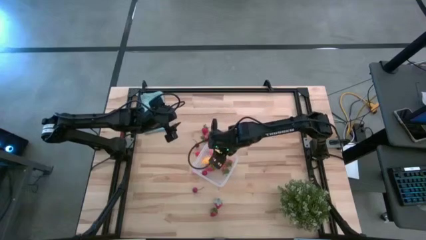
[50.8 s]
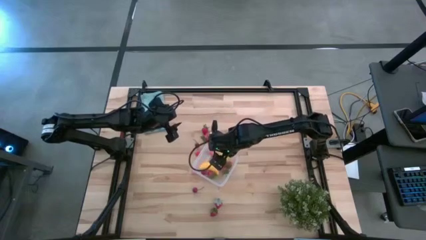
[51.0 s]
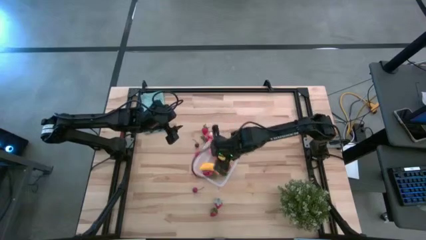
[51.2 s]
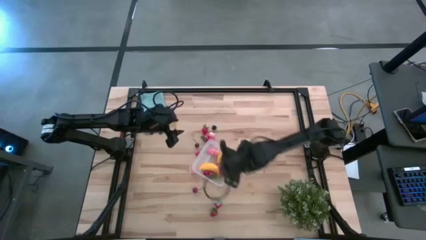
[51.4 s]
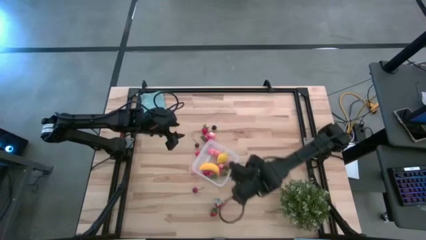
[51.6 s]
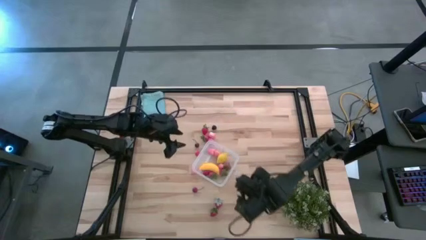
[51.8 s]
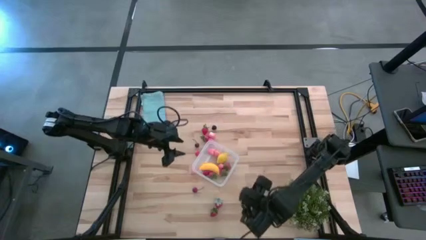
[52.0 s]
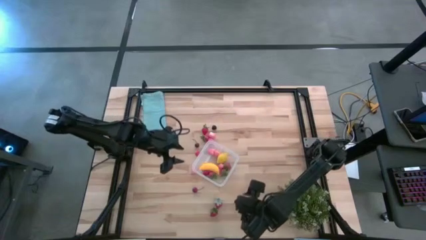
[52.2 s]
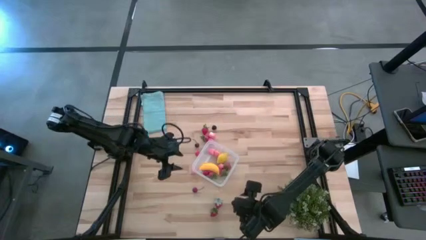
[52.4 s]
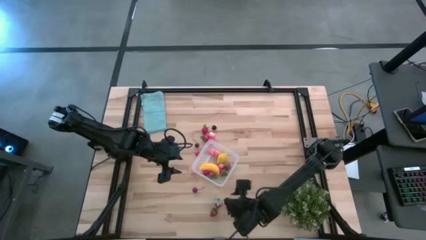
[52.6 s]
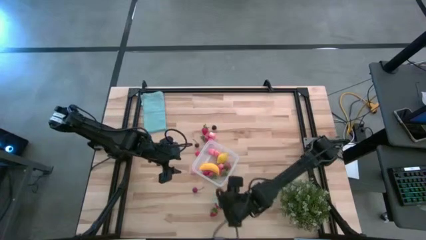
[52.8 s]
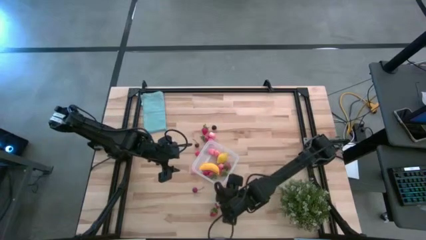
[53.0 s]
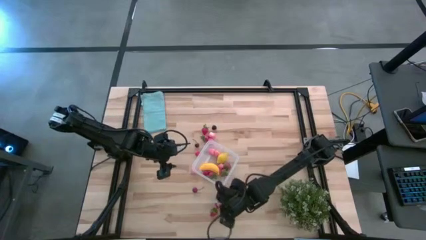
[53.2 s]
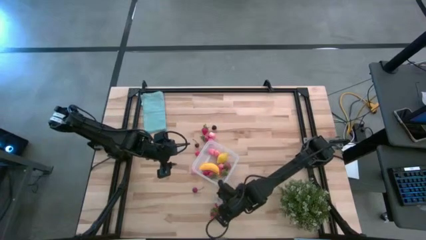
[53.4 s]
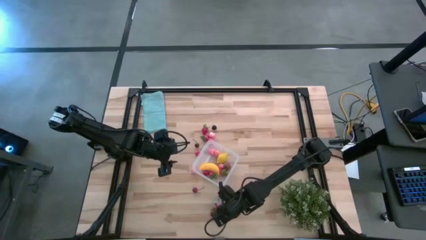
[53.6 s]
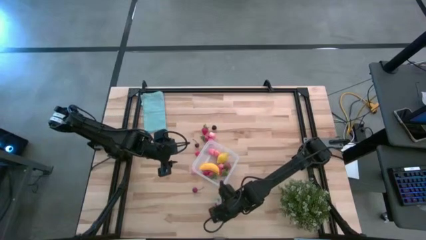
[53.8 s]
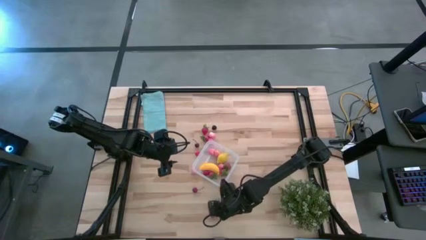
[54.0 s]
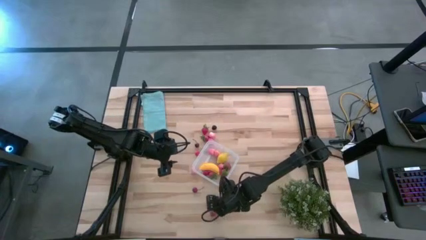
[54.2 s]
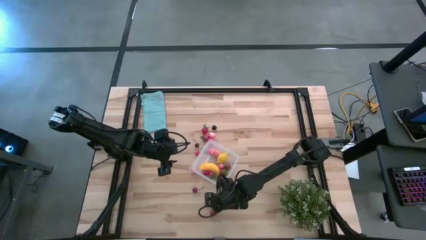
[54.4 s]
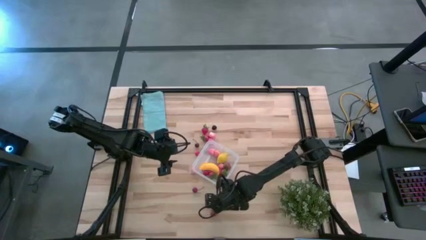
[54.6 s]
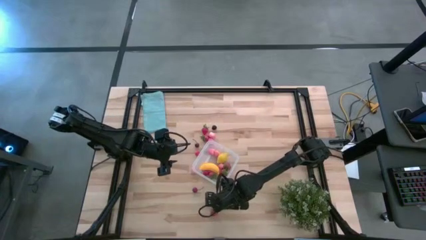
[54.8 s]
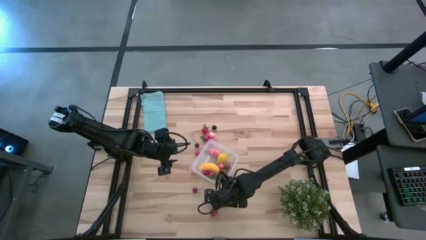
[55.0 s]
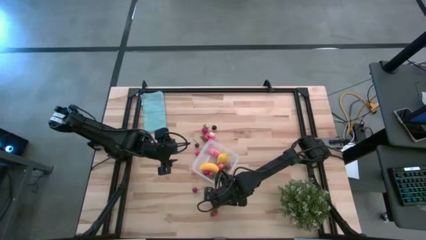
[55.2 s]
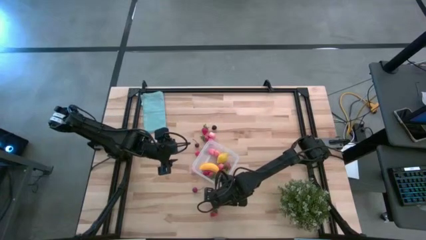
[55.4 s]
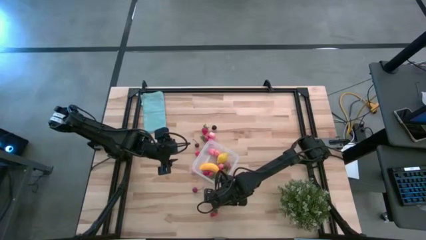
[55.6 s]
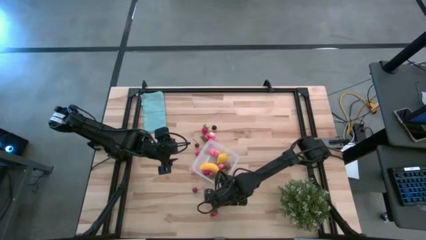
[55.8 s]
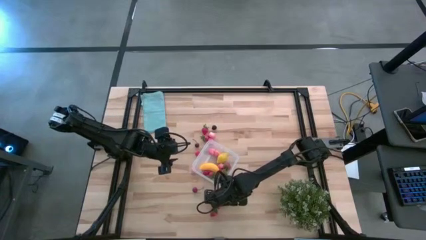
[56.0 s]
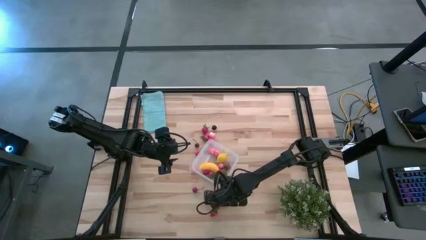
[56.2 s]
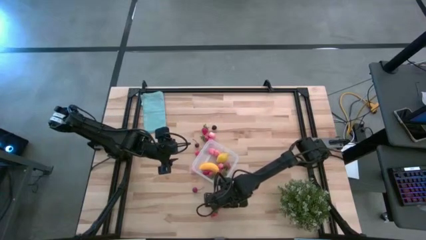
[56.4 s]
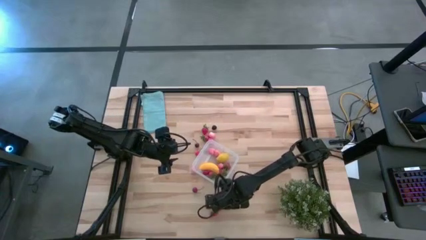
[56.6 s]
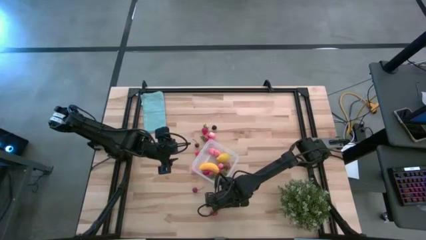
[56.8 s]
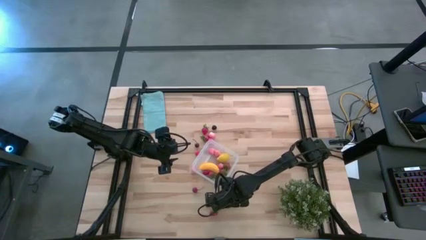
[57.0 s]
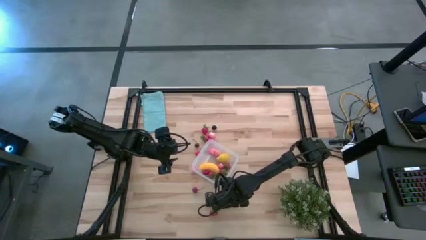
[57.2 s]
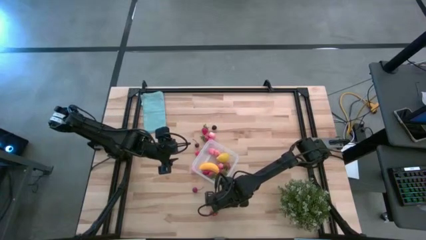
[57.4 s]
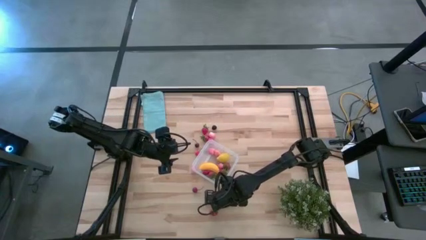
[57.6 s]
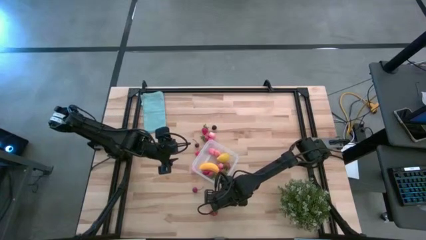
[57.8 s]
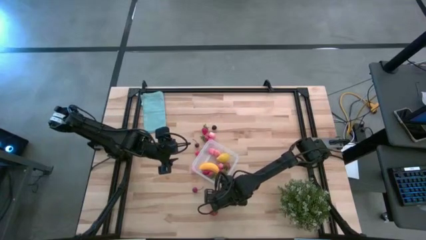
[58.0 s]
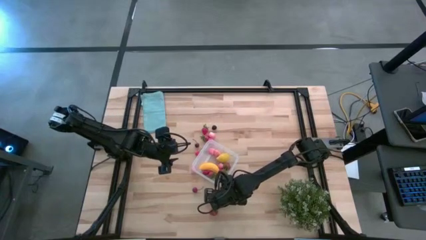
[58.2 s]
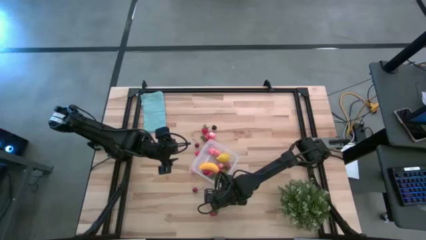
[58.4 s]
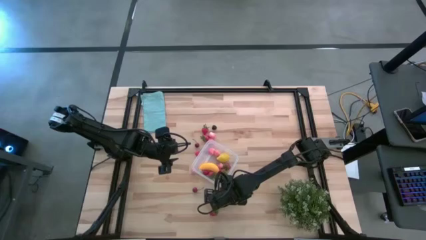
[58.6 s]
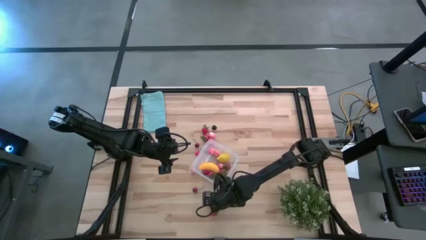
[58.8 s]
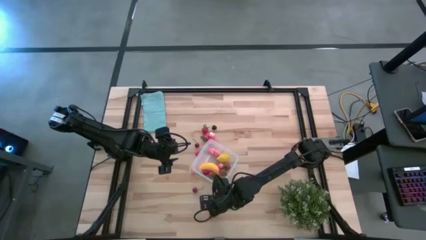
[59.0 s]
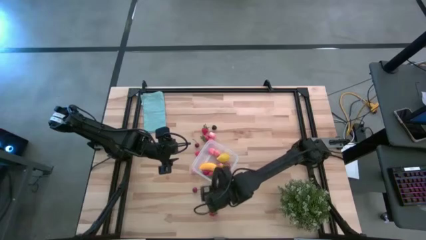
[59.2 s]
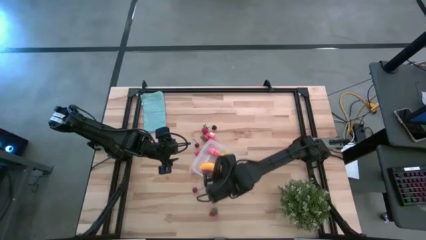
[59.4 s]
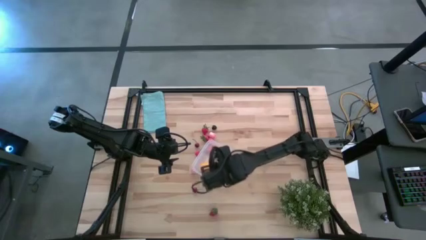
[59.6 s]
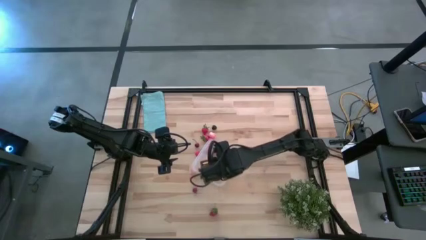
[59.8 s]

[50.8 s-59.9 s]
Task: Pick and placing Produce into tupperware
Put the red strawberry into the transparent container

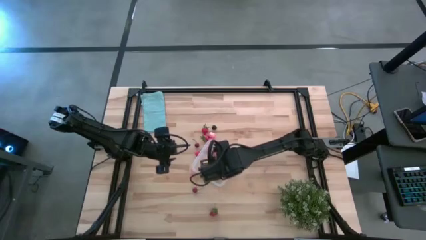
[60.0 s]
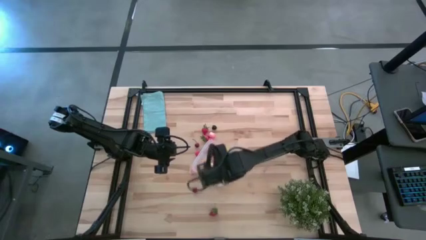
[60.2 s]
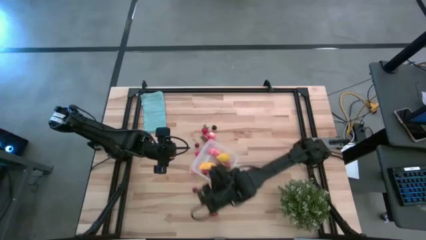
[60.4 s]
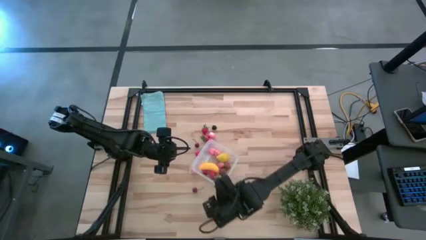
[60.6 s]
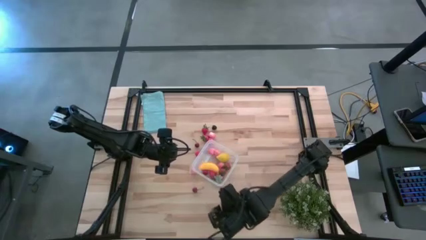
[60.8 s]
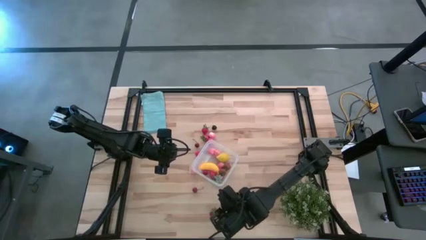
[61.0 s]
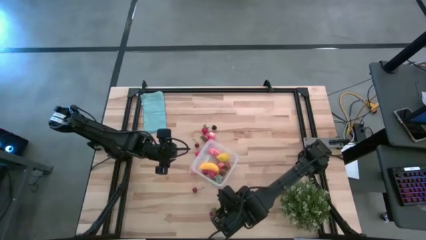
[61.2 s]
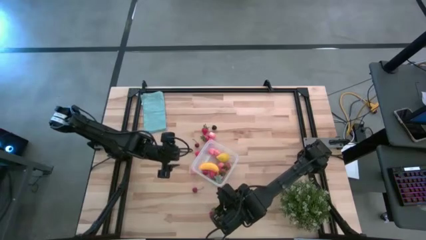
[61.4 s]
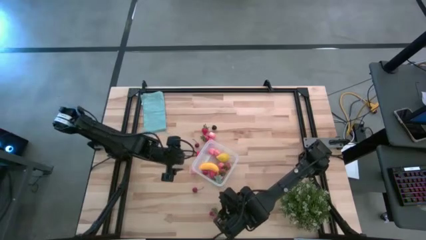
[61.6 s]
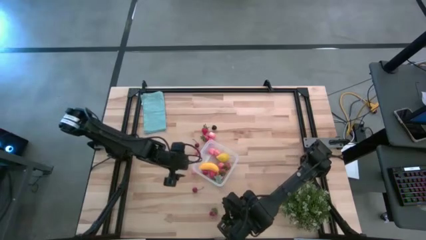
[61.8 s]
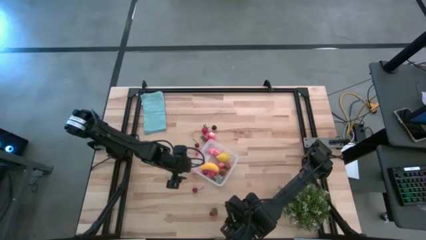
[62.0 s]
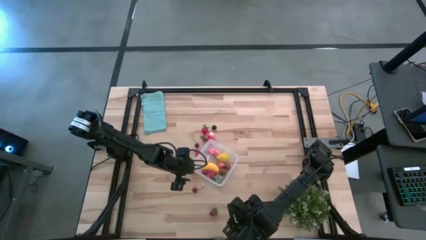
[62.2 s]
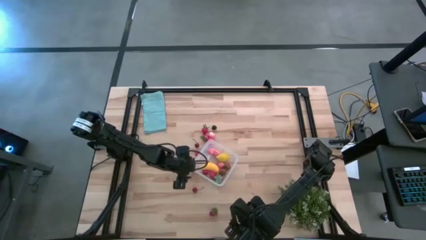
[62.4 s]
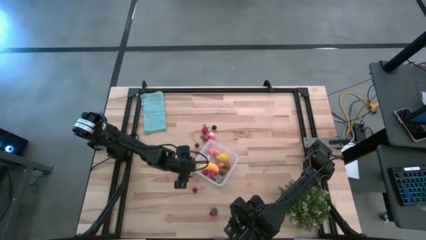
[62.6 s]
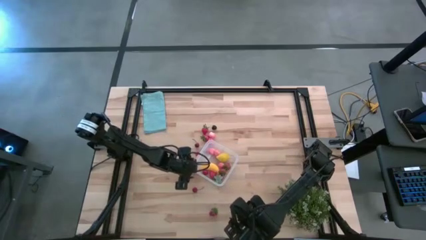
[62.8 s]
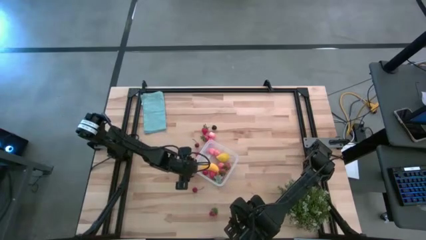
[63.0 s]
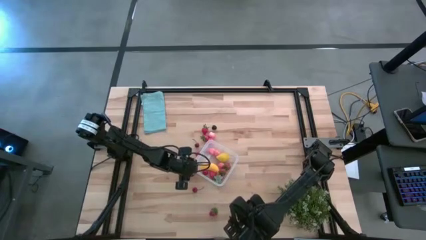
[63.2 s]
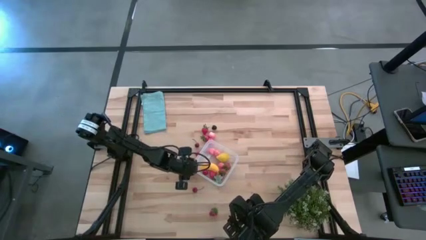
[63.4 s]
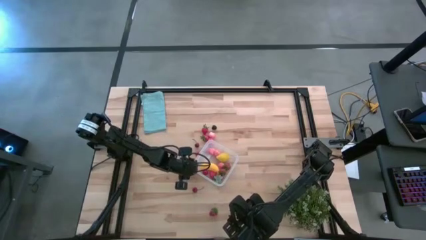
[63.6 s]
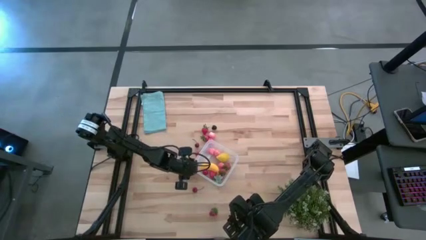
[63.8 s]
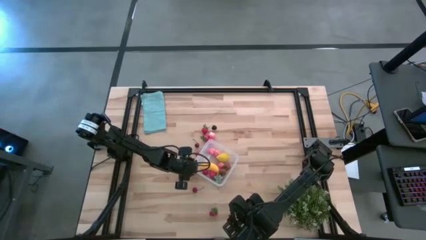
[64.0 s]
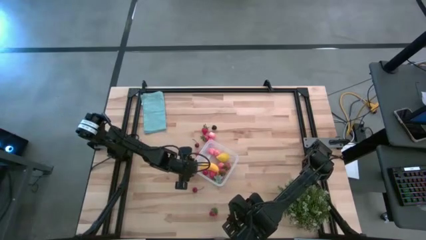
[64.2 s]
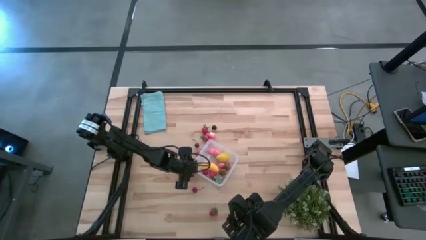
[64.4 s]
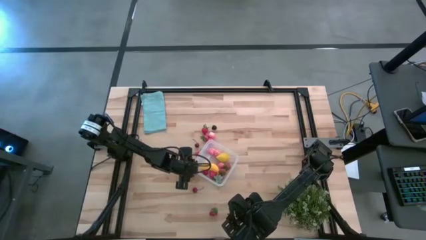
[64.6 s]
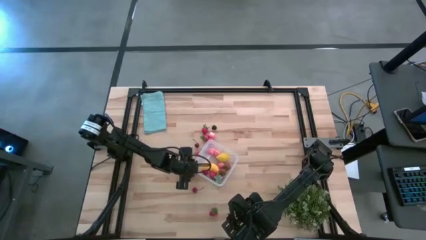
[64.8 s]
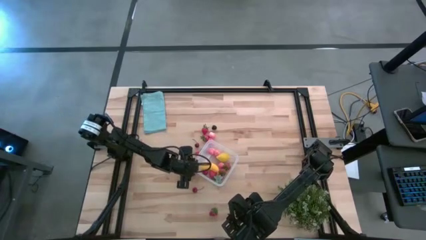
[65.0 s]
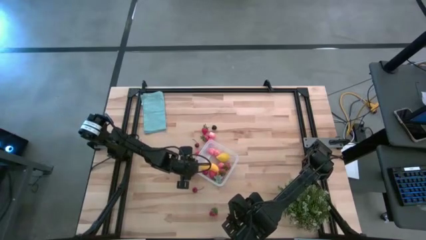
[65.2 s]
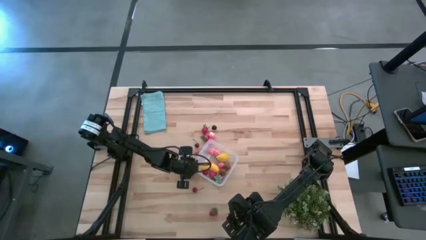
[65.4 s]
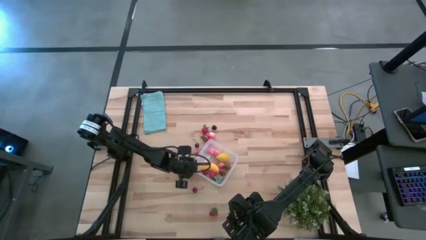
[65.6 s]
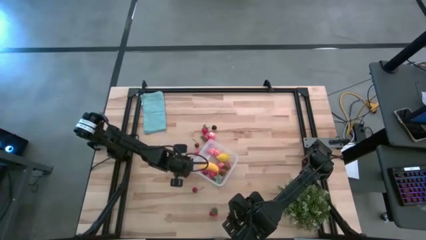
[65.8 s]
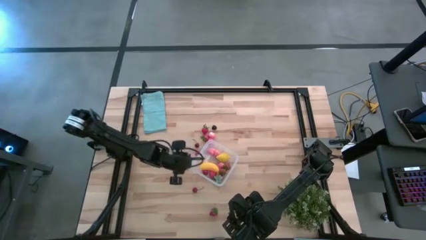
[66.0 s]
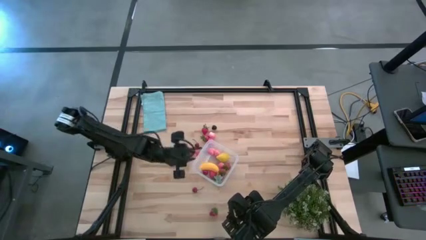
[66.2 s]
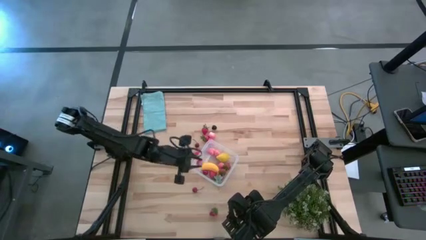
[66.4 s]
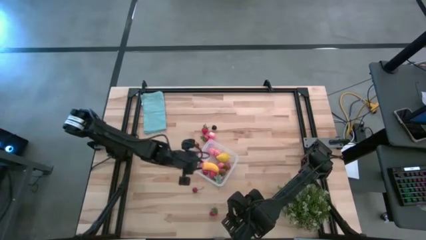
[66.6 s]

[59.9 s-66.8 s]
Put the pink peach into the transparent container

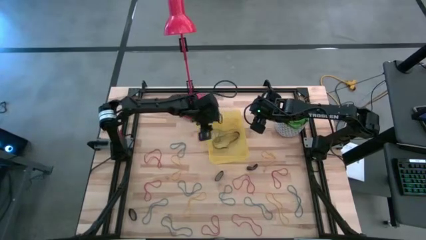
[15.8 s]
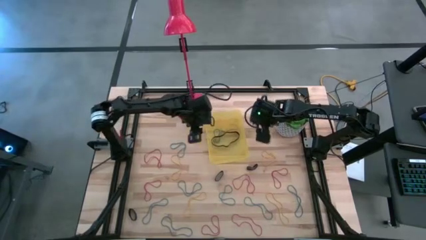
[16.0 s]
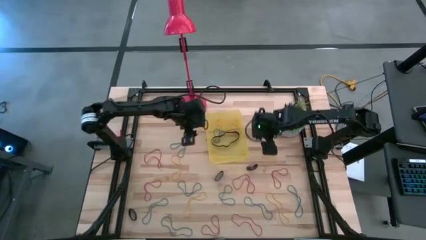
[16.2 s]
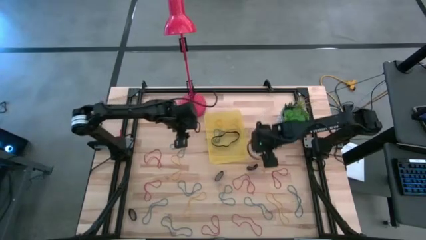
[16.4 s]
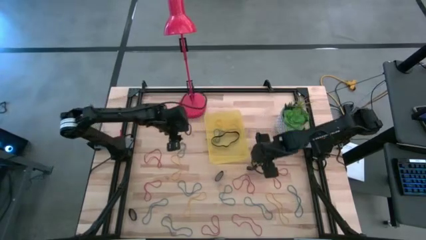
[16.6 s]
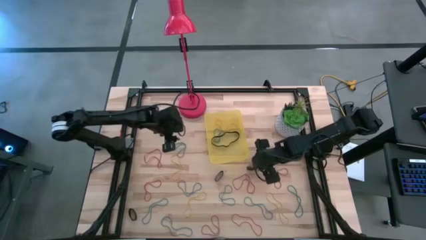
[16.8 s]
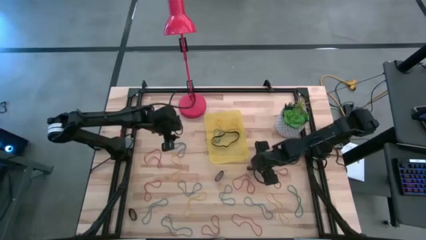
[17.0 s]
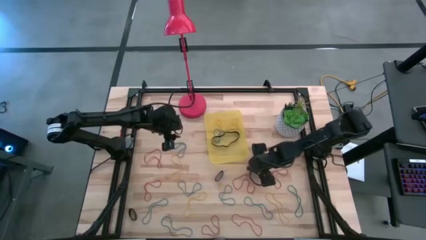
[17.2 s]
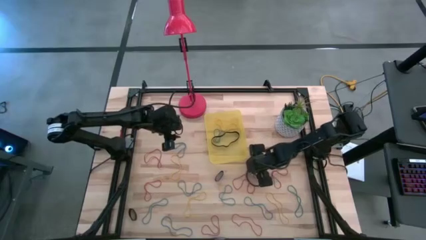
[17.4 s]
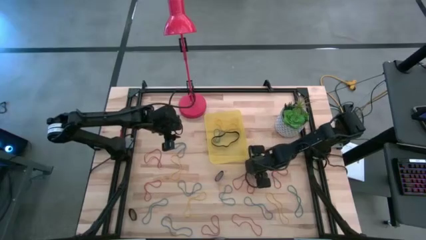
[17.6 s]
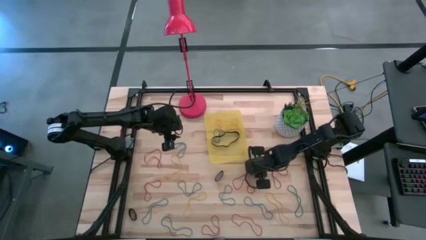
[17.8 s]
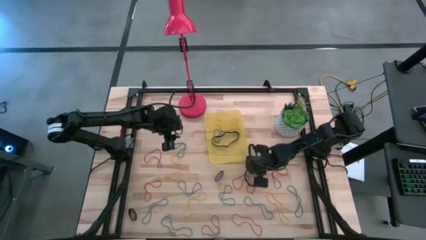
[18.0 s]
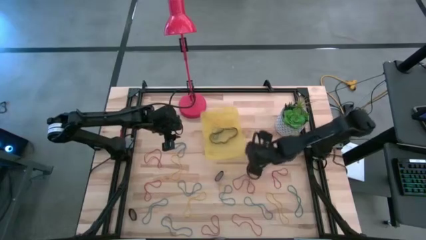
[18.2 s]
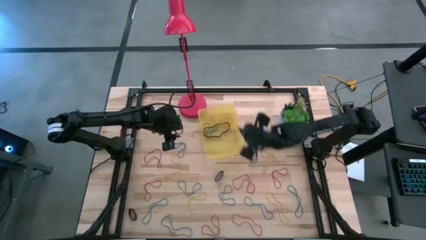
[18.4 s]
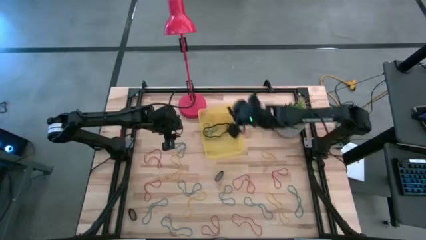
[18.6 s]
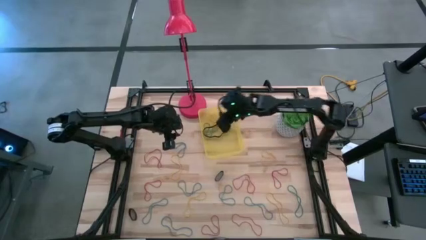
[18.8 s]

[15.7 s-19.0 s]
Task: Pick and place rubber bands into bin
Put the black rubber band into the yellow bin
